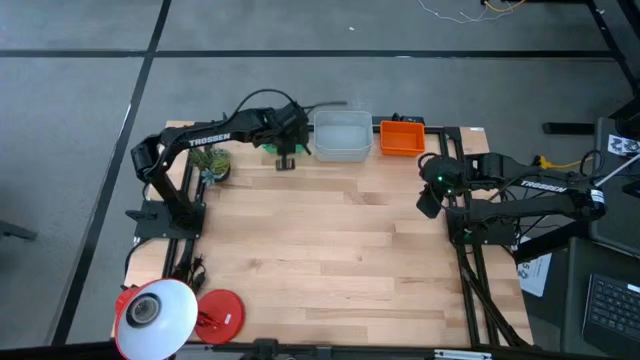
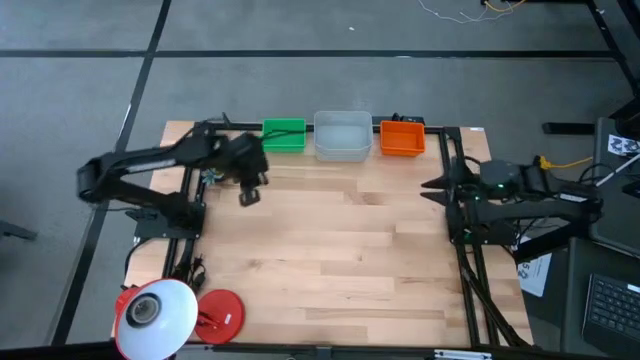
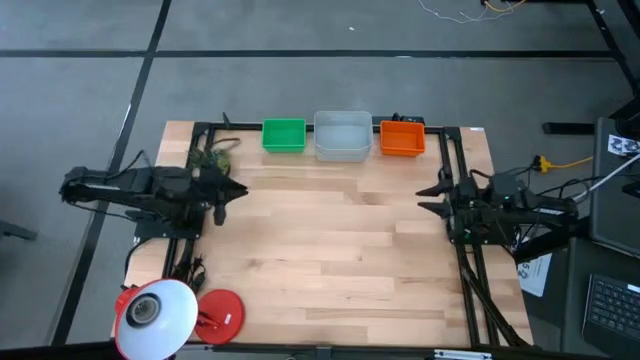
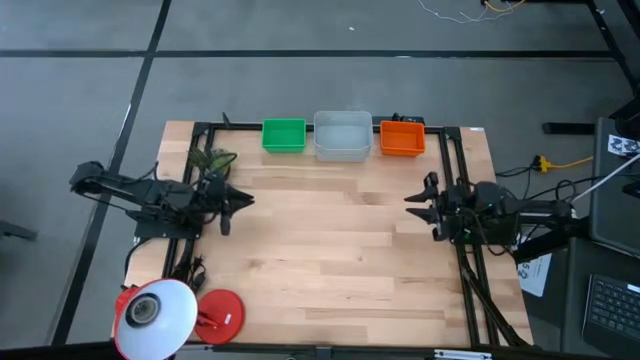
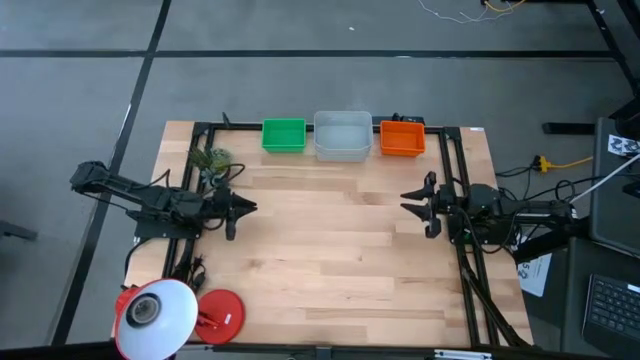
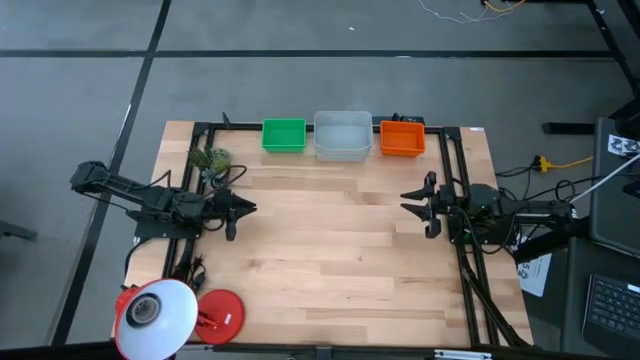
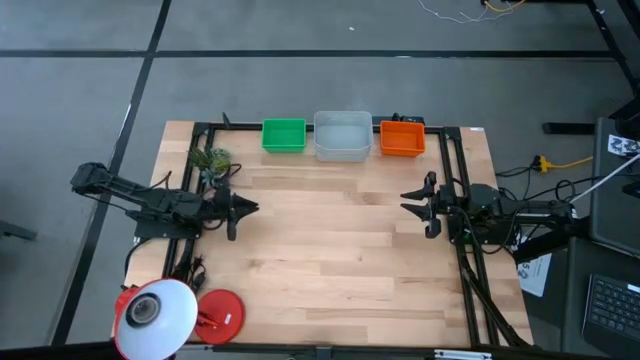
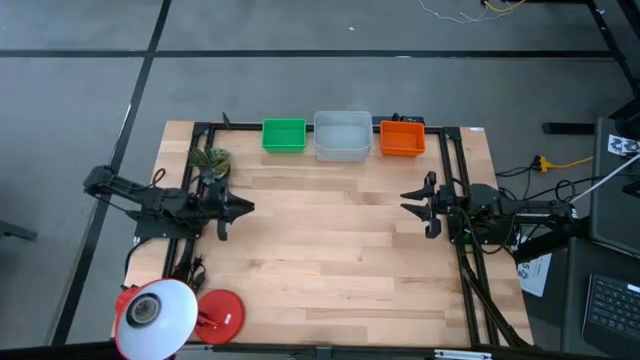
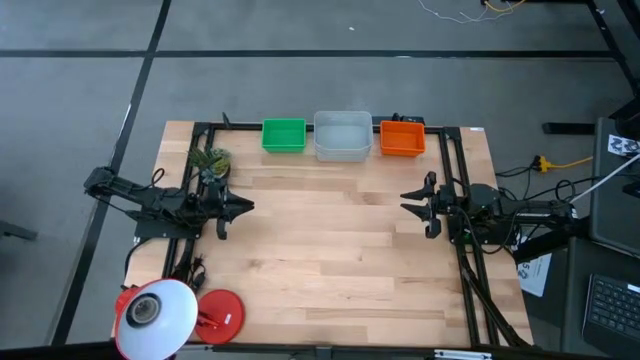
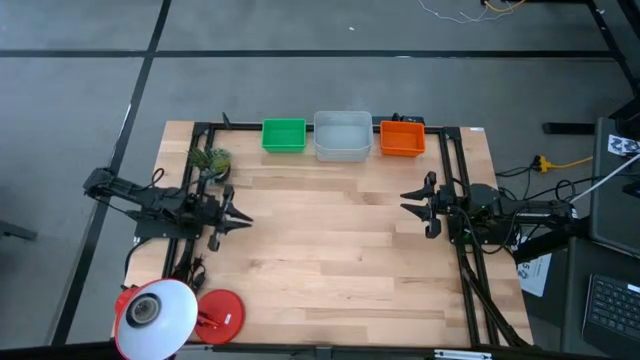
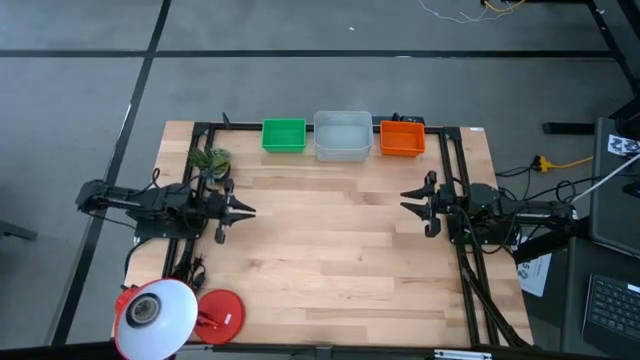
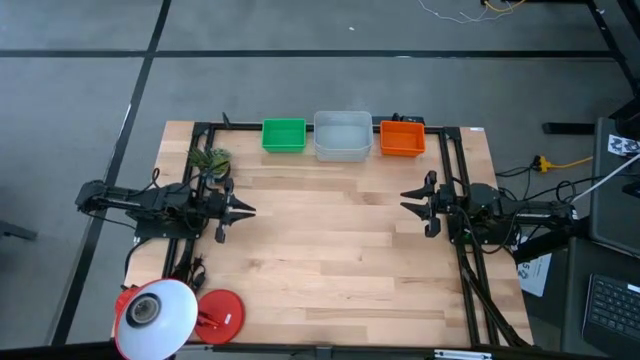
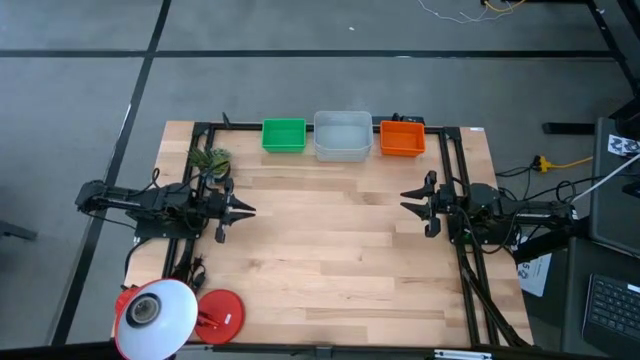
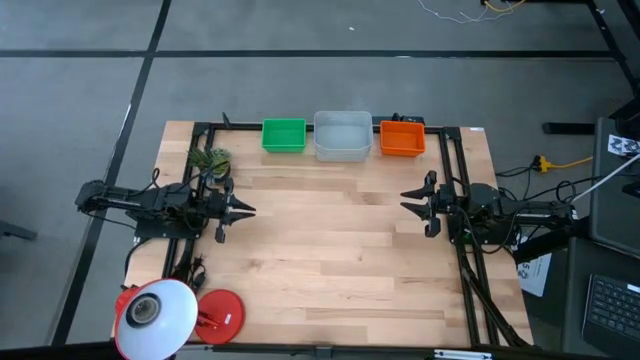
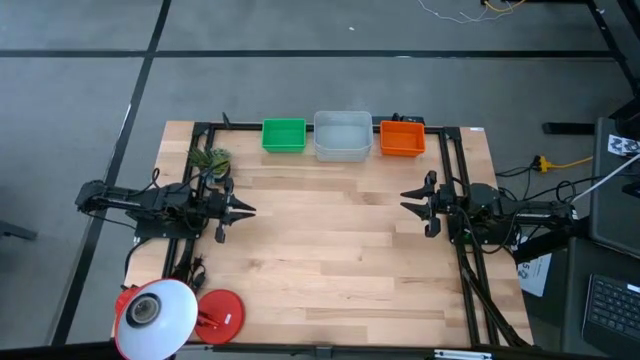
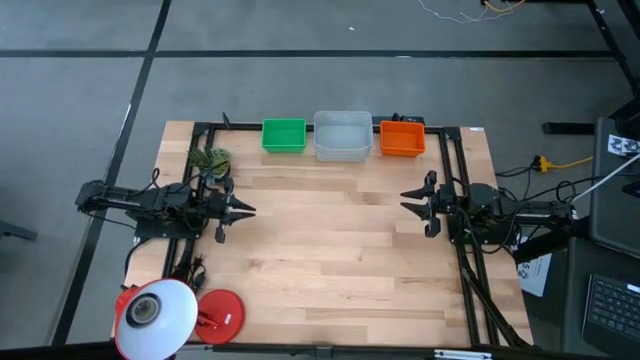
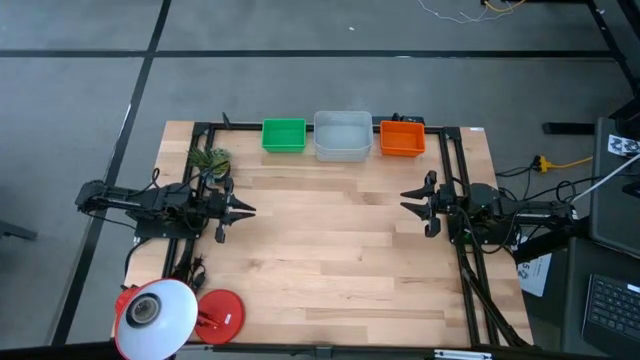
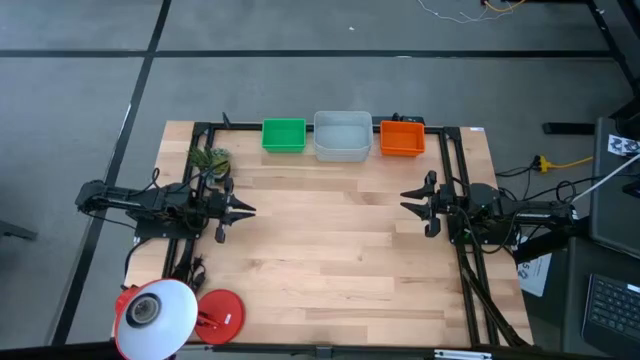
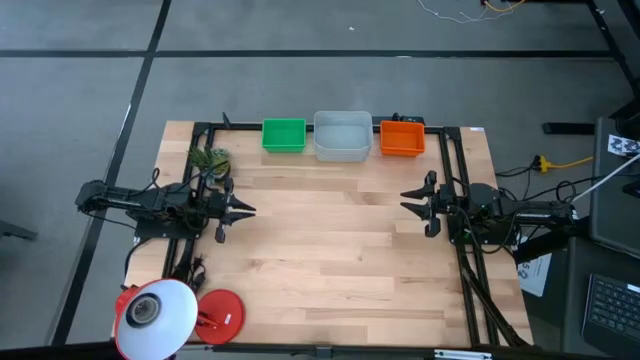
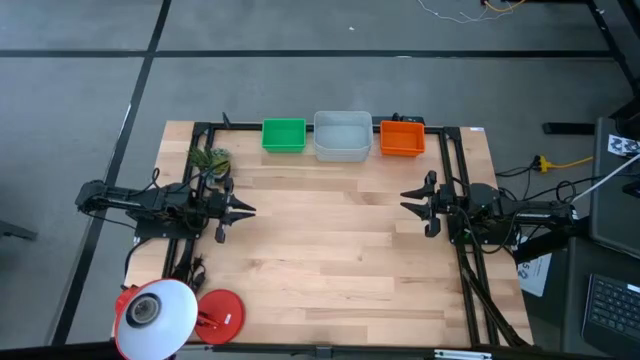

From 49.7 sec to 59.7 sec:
Return to Home Position

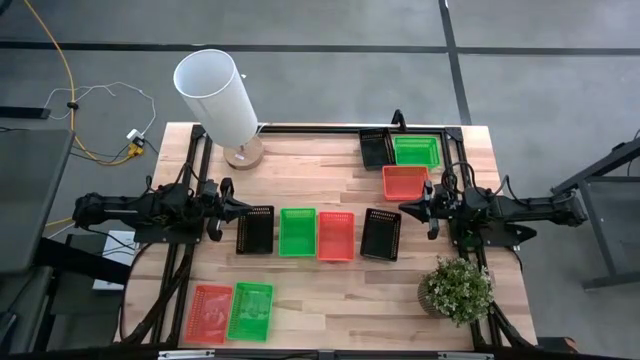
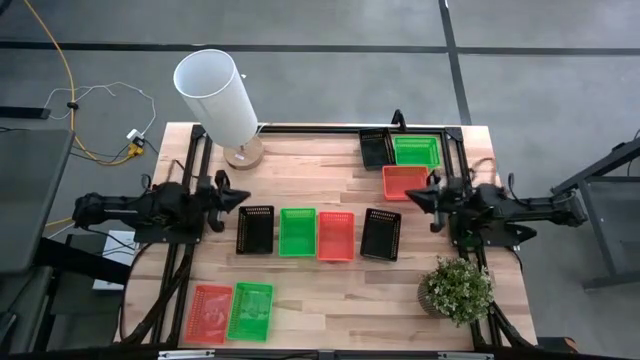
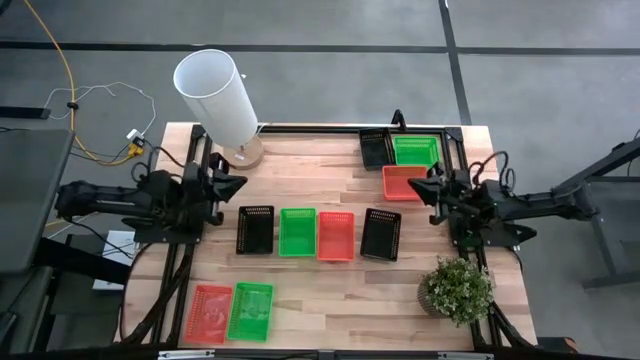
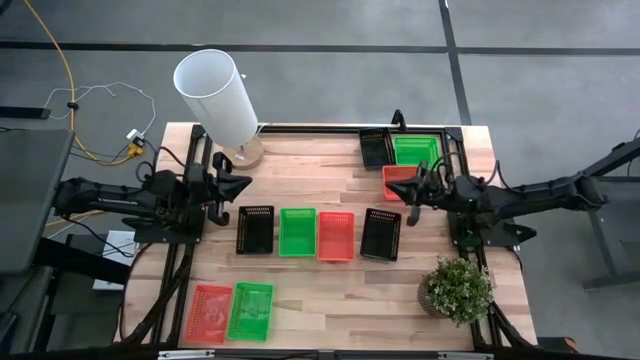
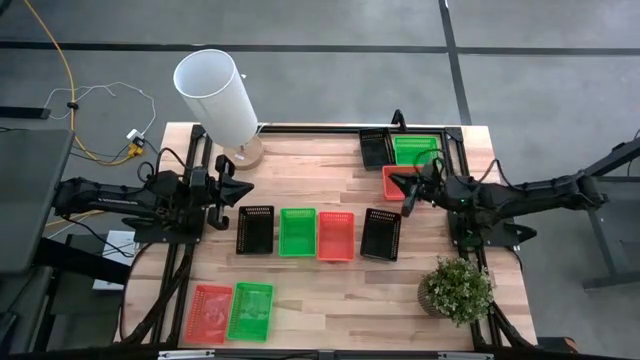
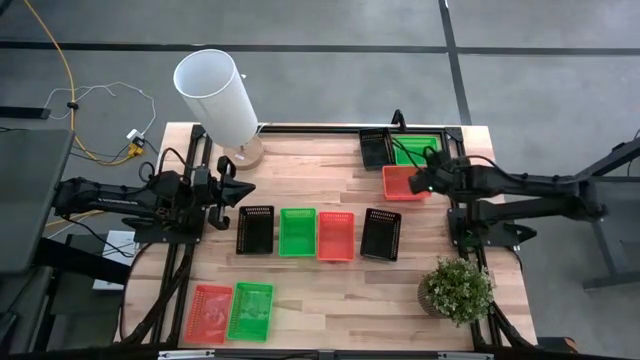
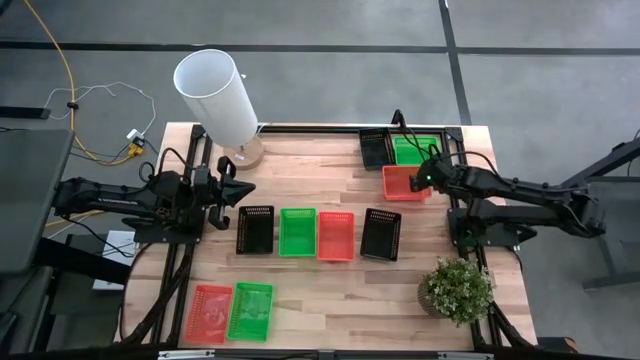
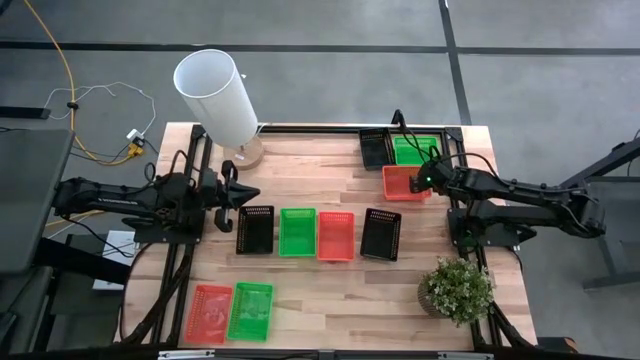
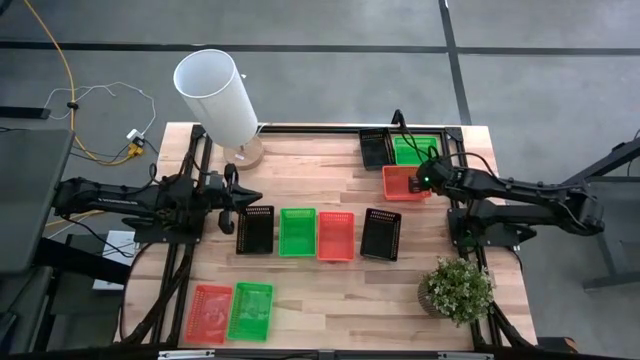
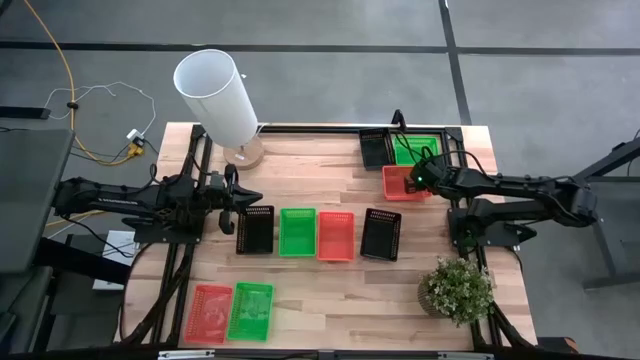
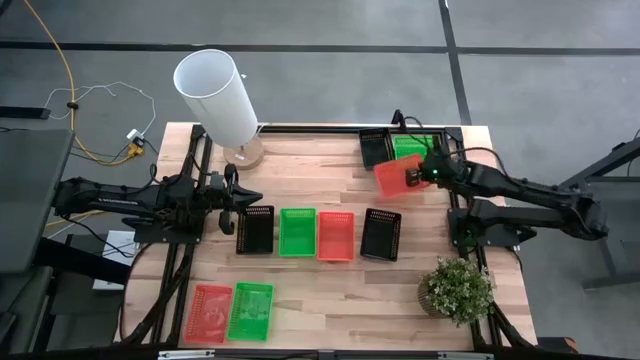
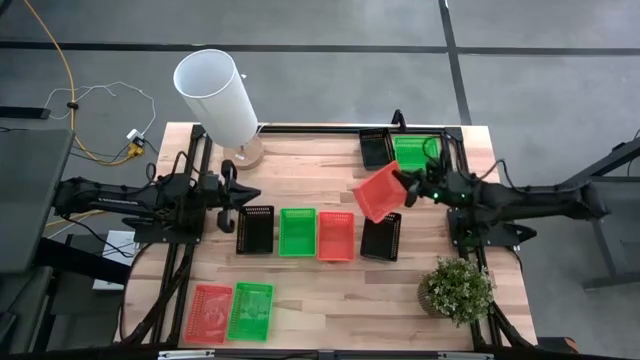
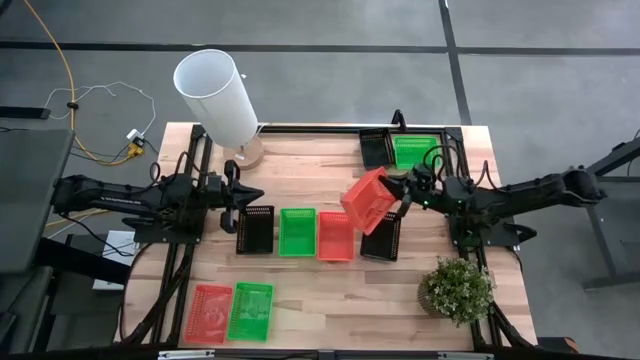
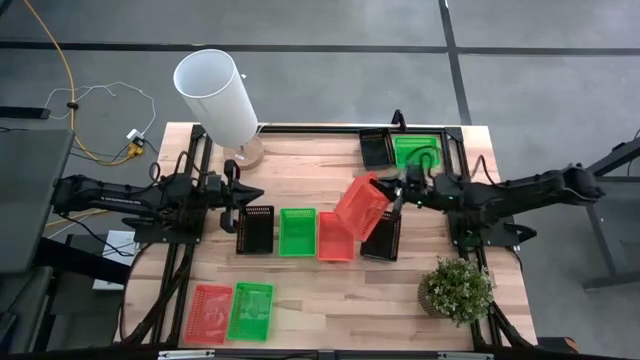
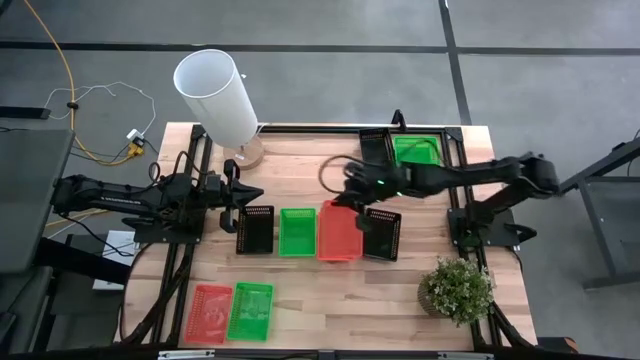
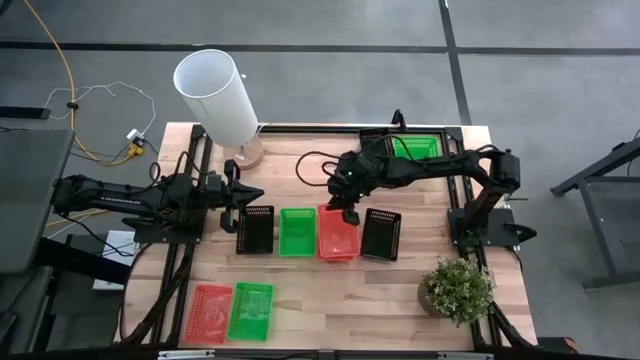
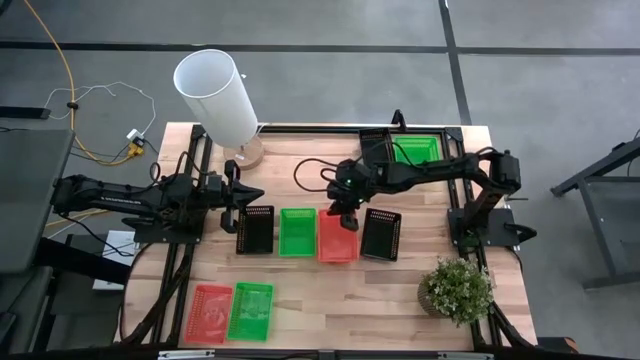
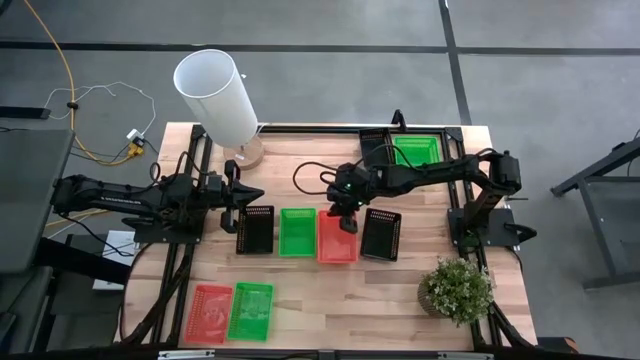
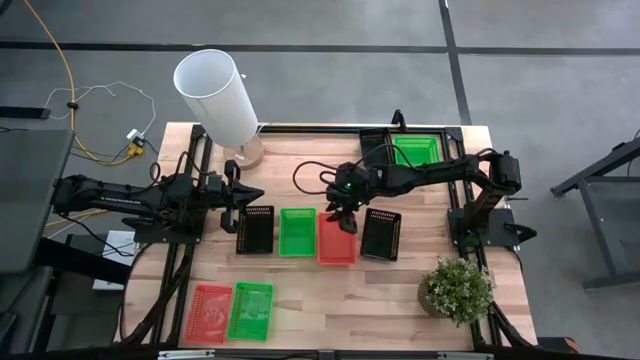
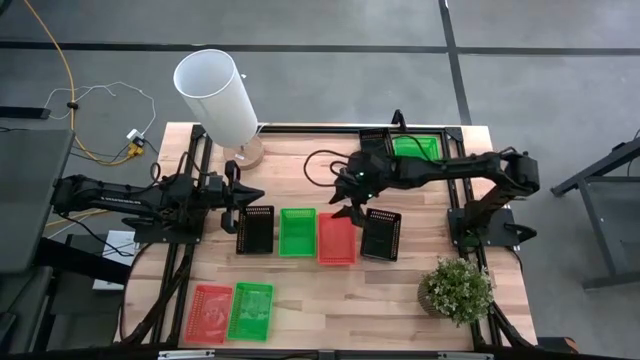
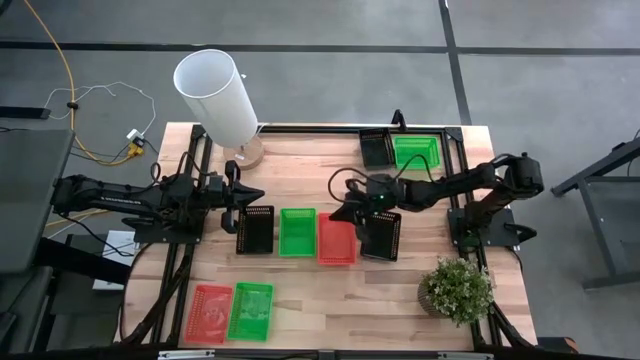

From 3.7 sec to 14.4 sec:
Stack the top orange bin on top of the middle orange bin

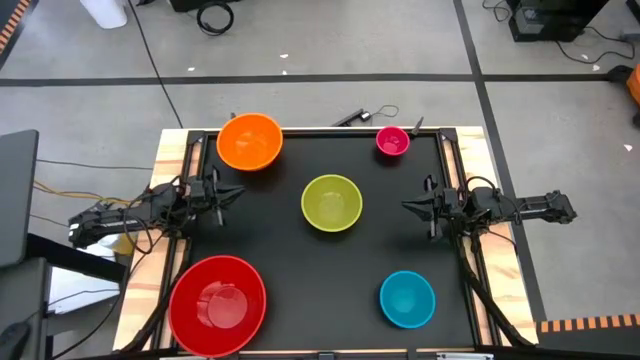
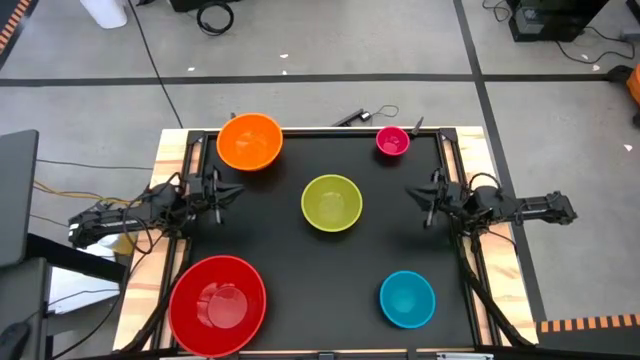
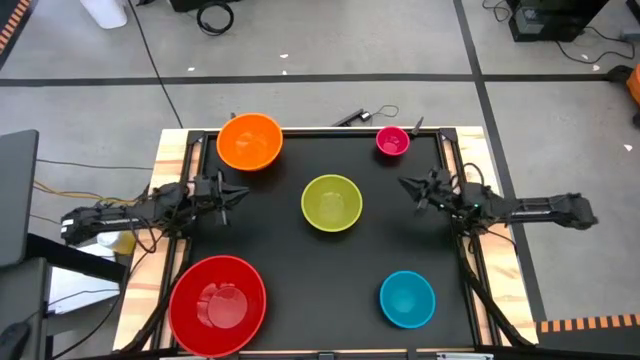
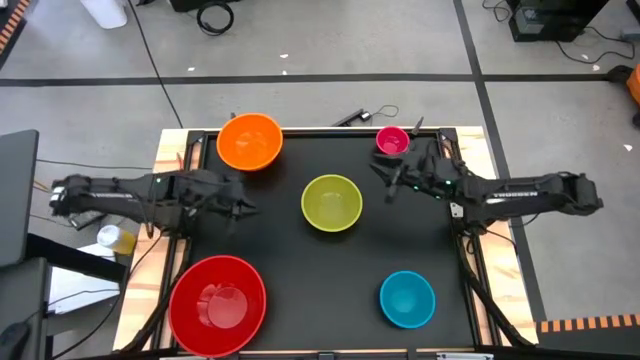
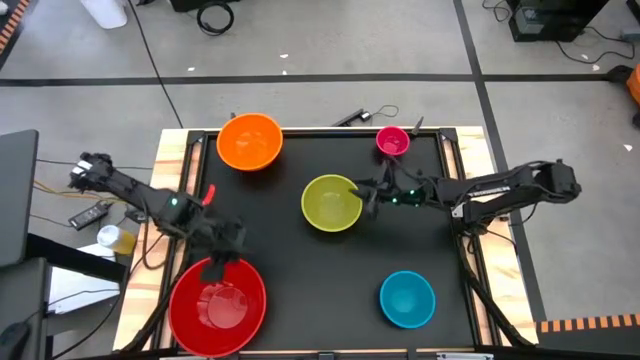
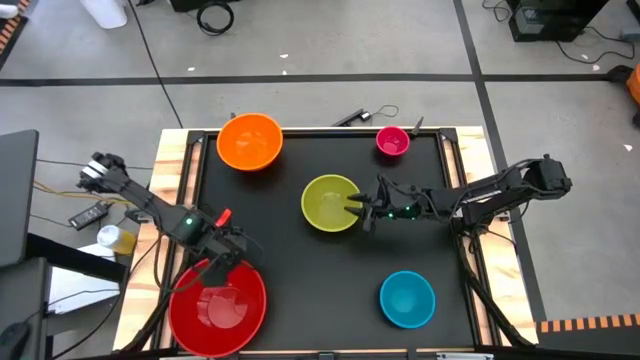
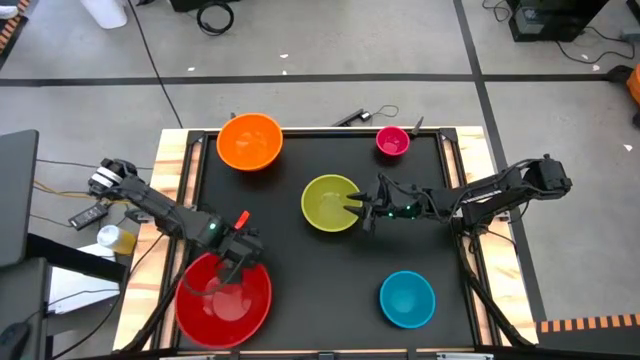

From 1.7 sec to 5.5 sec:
Adjust the red bowl
